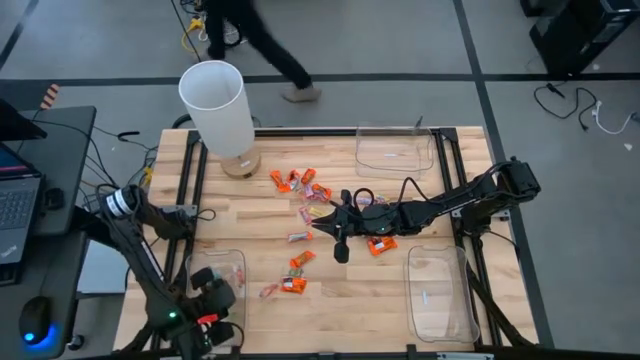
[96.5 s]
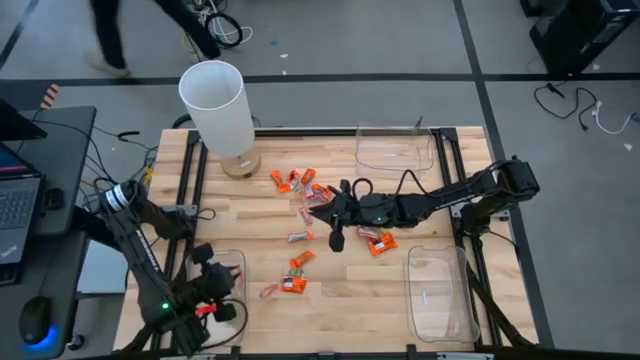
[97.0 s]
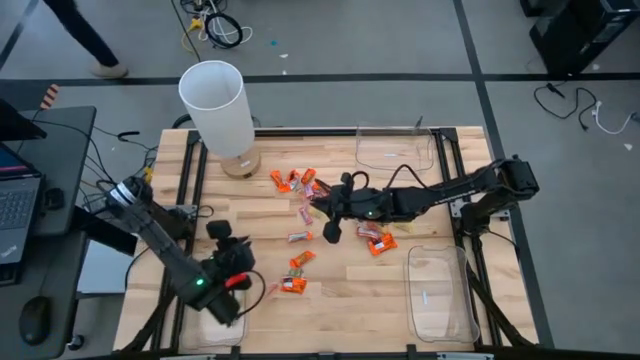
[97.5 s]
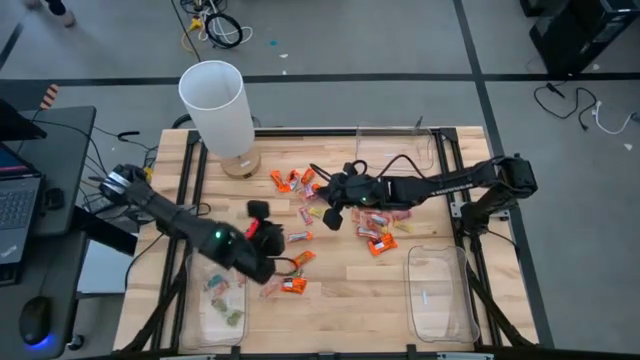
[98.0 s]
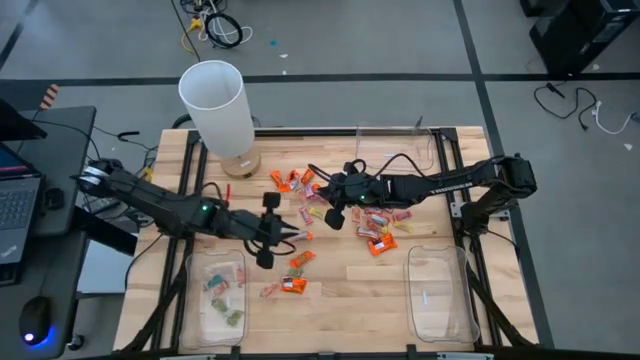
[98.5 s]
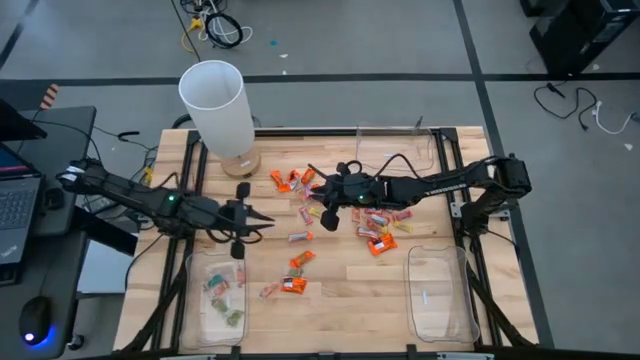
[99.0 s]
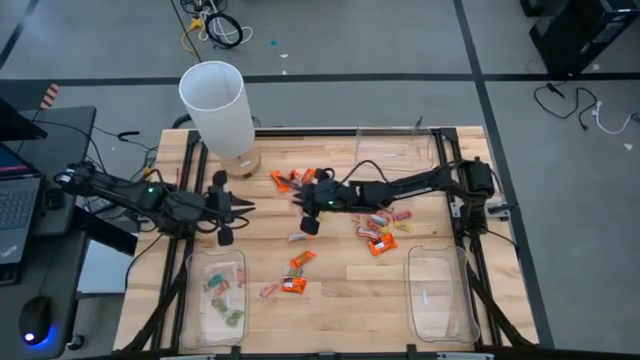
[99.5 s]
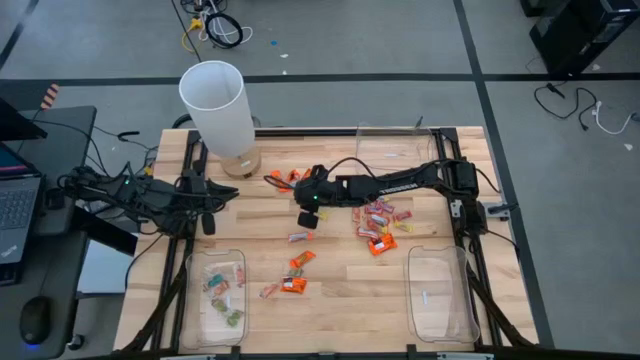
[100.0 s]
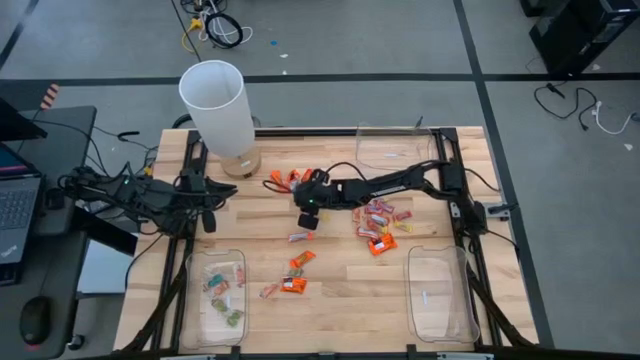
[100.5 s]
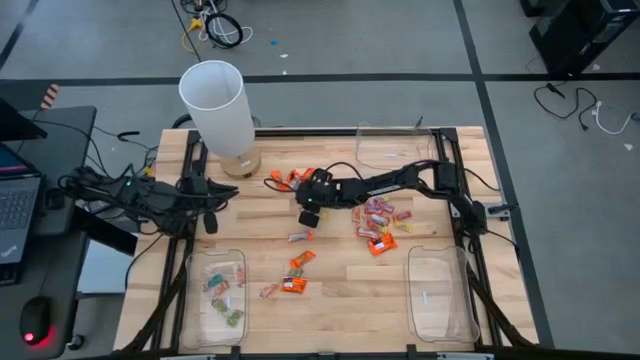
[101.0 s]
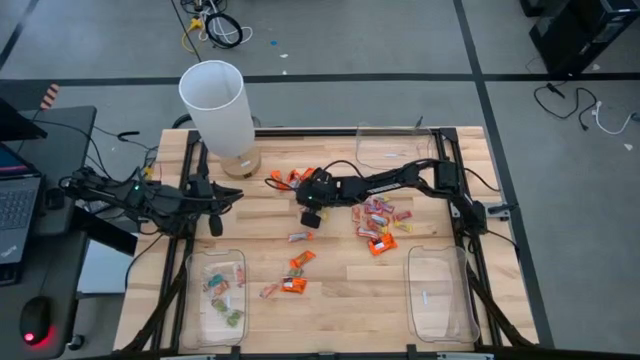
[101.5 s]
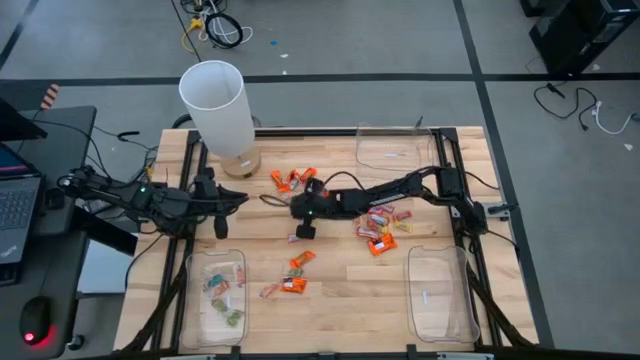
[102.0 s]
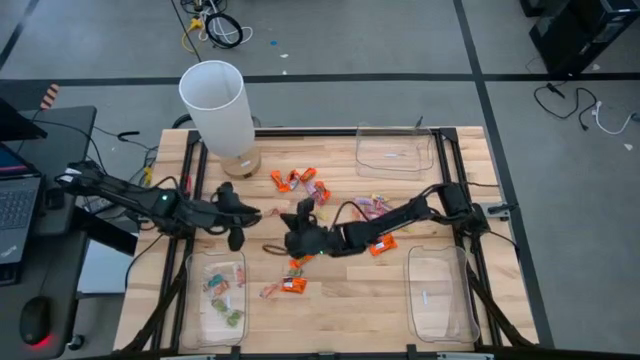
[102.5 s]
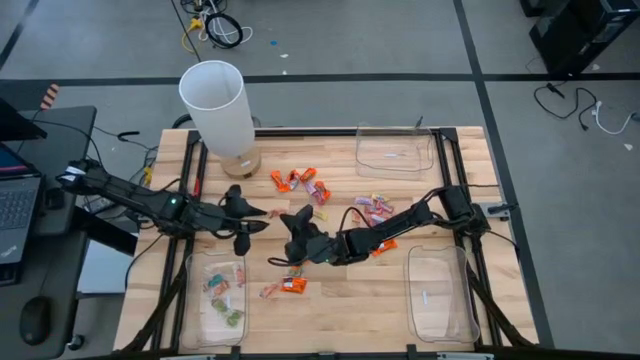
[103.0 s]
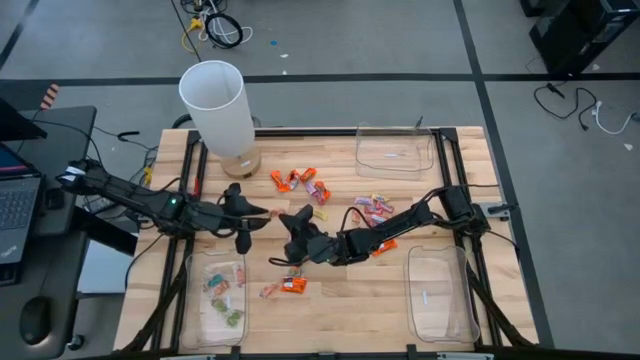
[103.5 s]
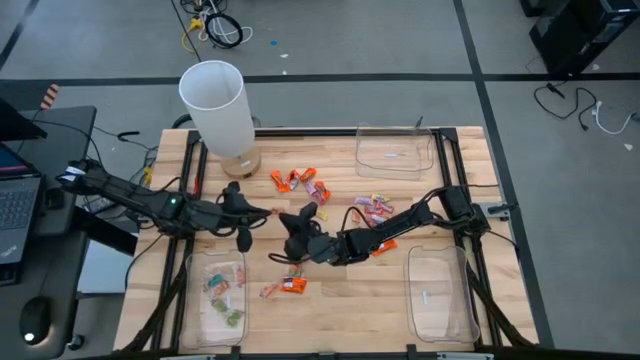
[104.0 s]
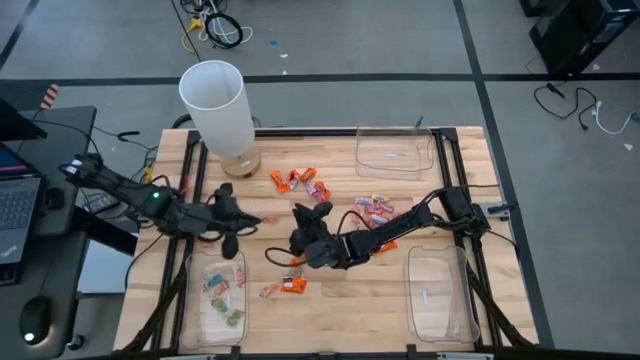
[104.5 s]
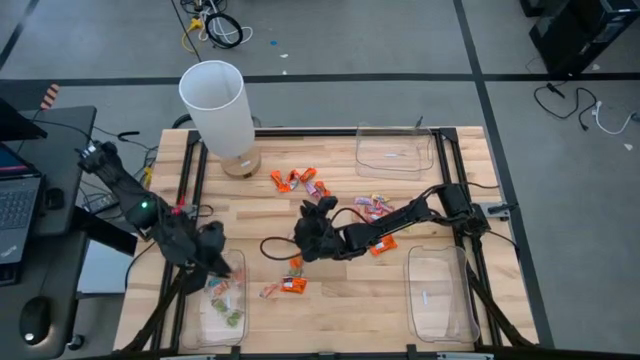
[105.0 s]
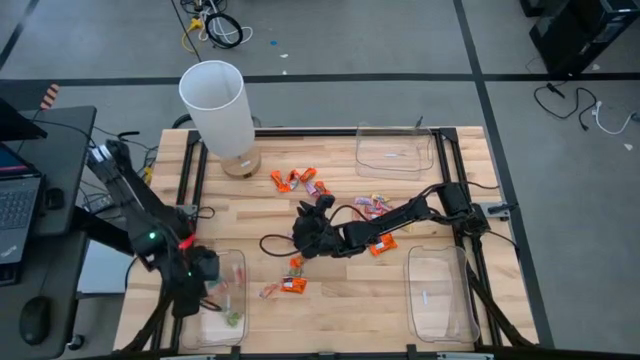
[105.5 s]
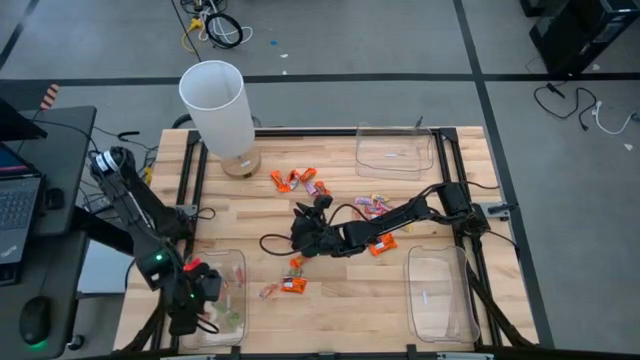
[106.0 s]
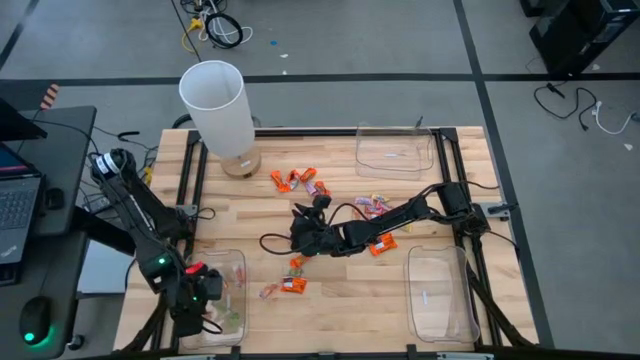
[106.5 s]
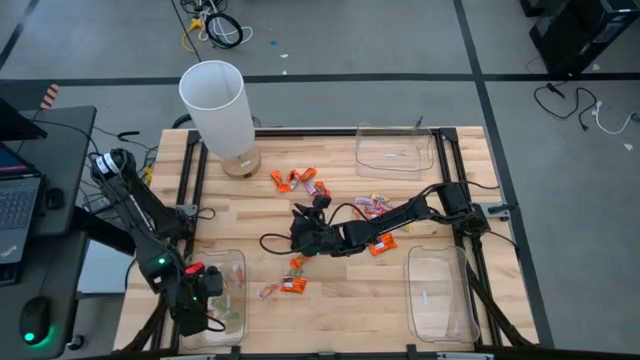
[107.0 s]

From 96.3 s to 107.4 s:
Task: Sort candy
Put the orange gummy into the bottom left transparent bin

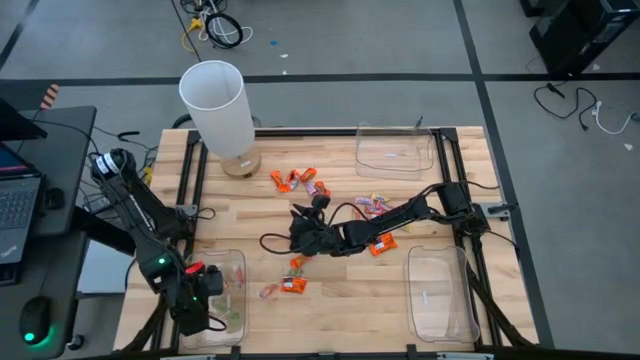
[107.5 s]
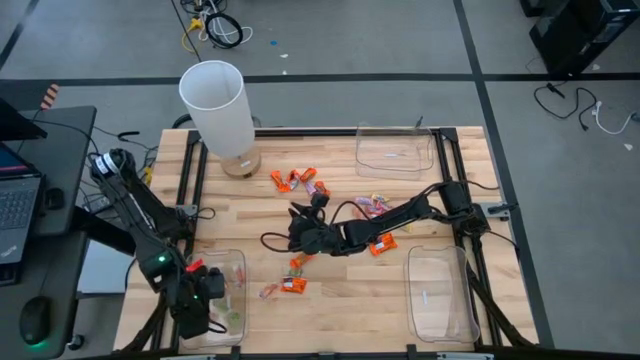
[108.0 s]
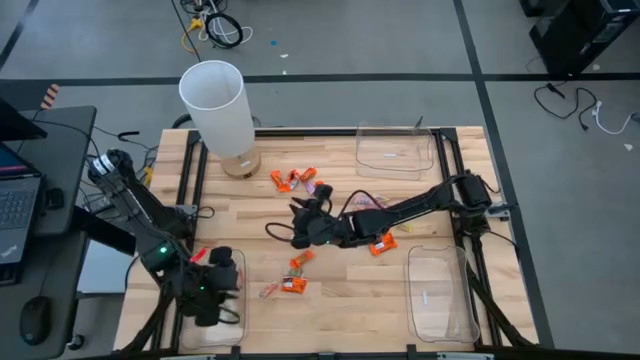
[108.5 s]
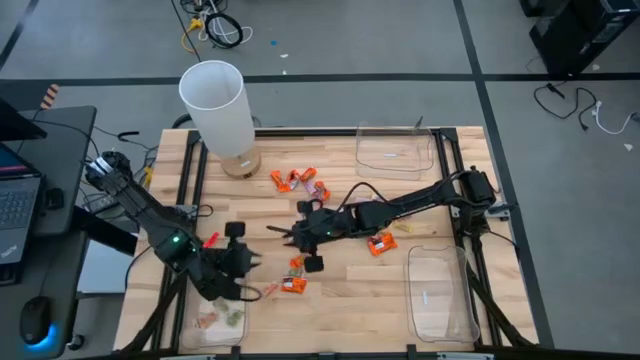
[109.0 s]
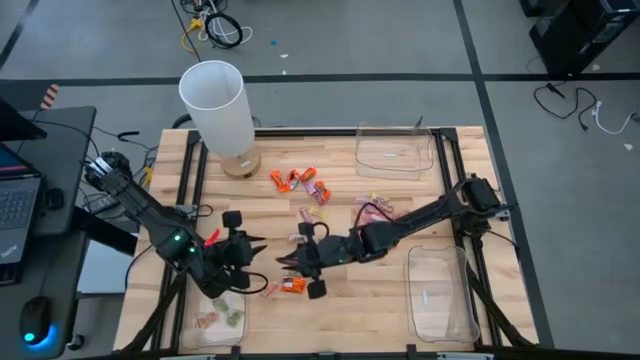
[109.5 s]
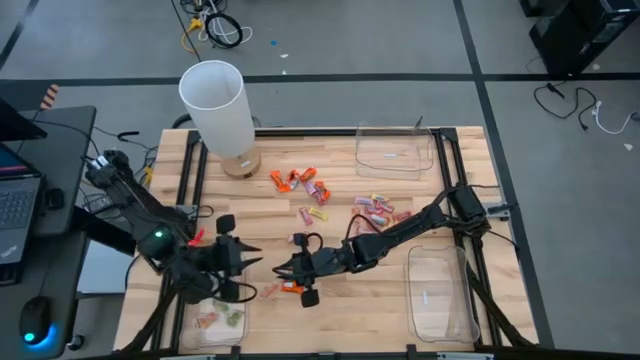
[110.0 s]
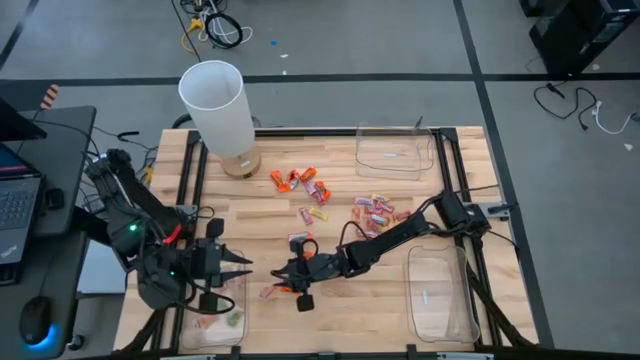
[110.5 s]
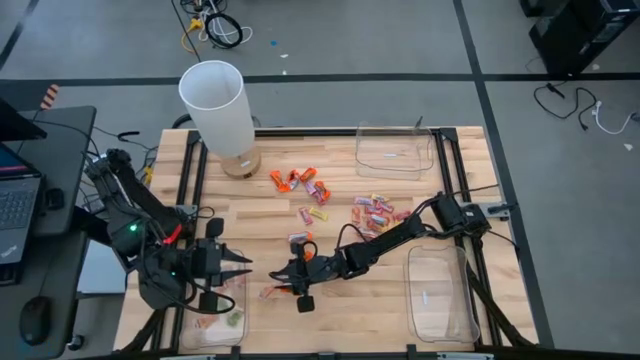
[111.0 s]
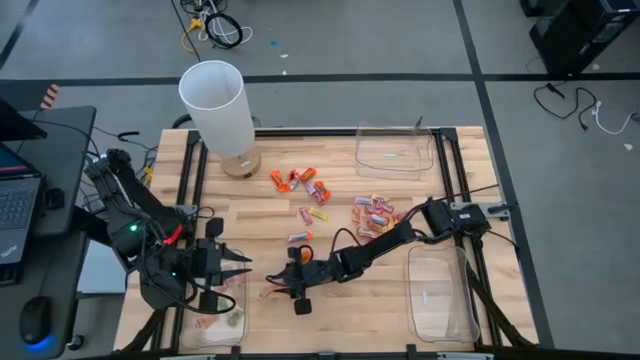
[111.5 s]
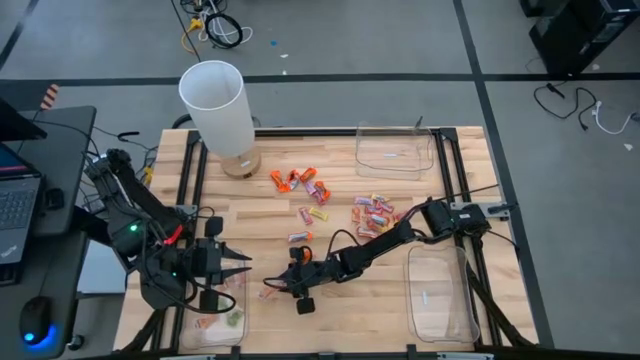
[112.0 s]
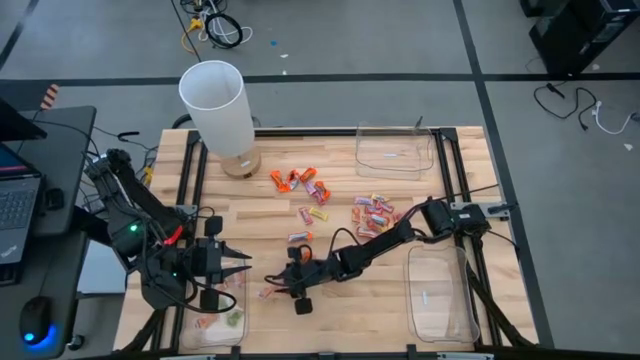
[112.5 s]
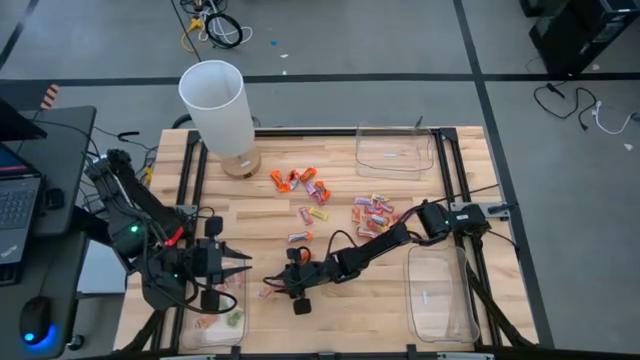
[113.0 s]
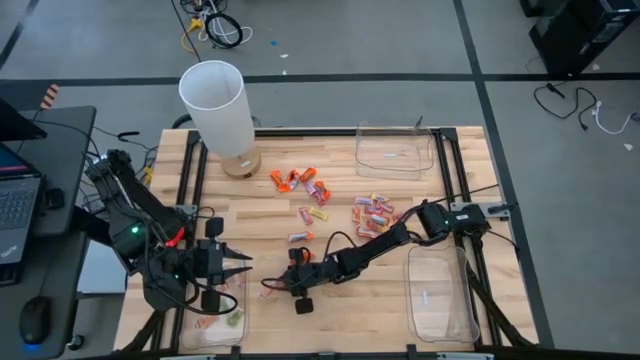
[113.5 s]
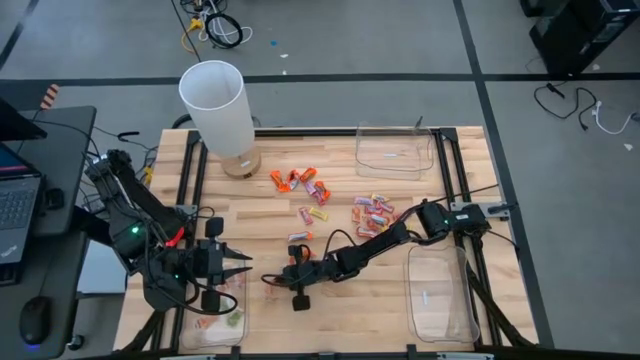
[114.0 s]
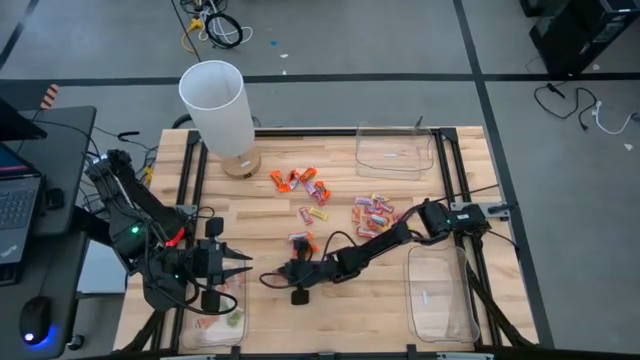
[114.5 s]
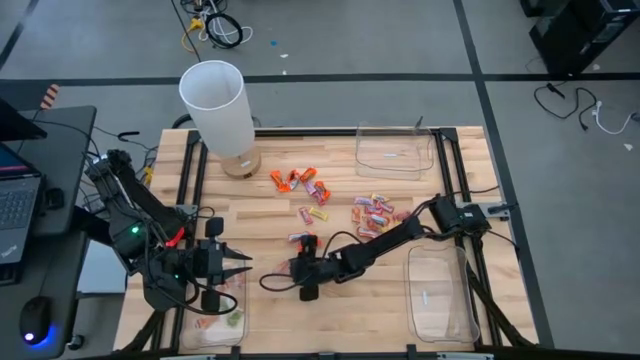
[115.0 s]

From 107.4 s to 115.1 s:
Put the orange gummy into the bottom left transparent bin

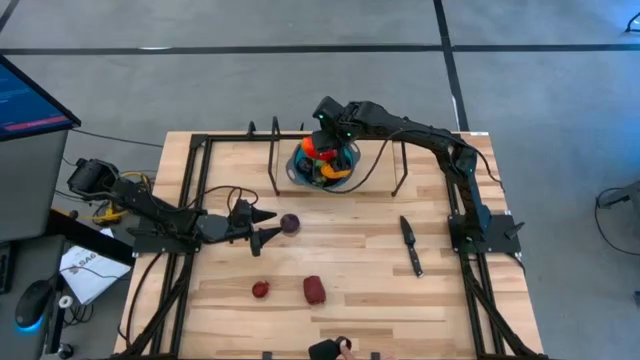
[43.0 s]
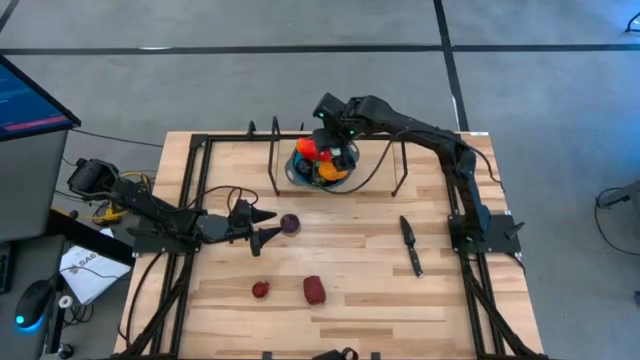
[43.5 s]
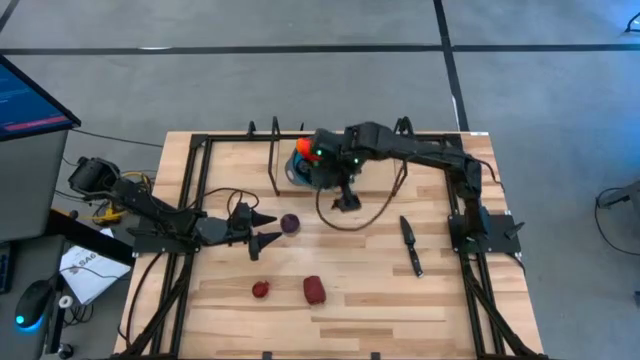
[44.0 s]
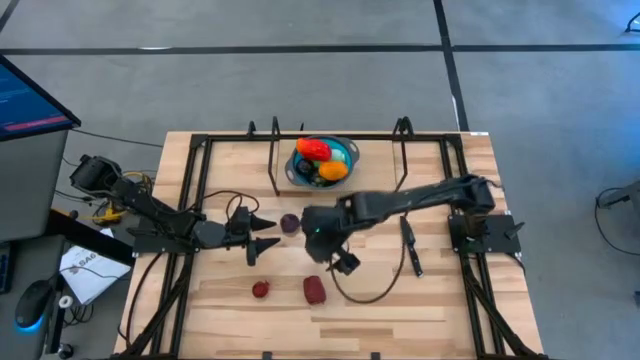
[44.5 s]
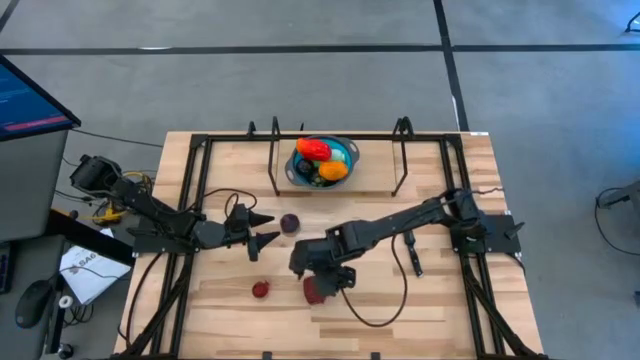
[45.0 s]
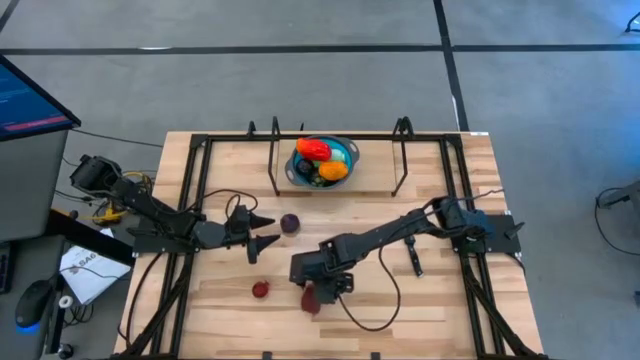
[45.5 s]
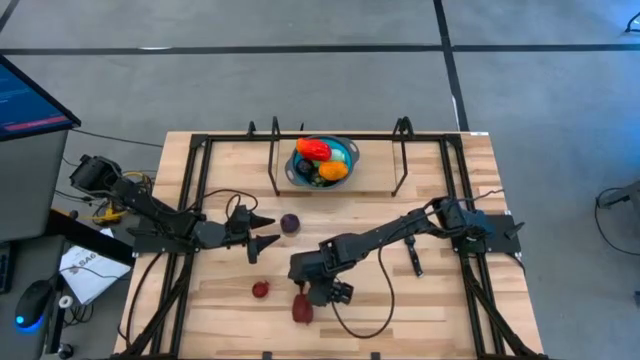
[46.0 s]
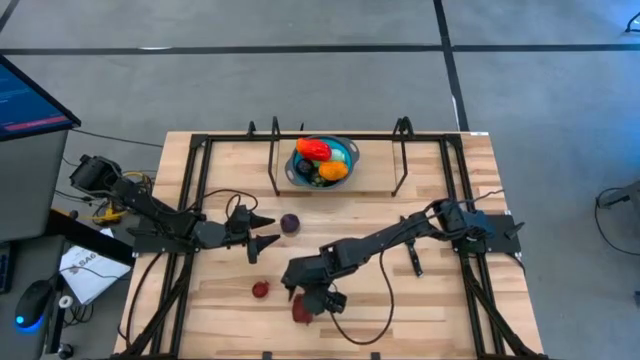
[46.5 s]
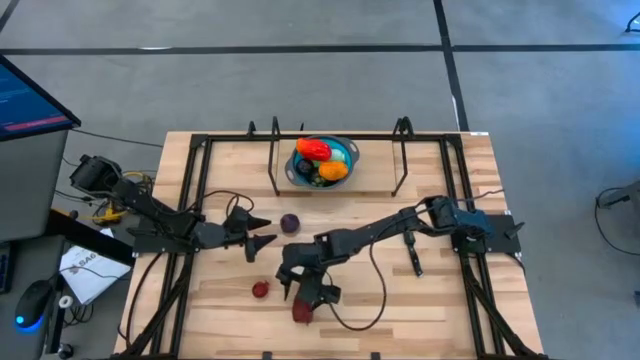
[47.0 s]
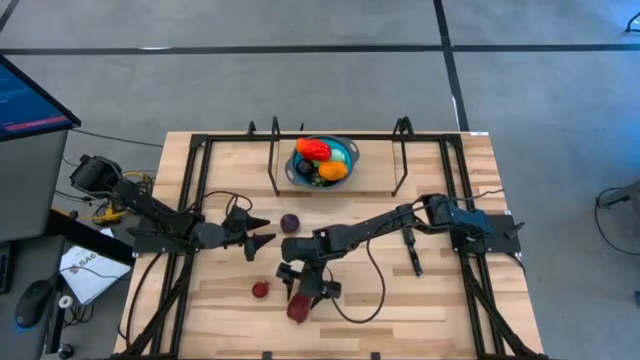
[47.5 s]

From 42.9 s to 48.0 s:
Task: Pick & Place Fruit
Put the red apple into the blue strainer bowl on the shelf
